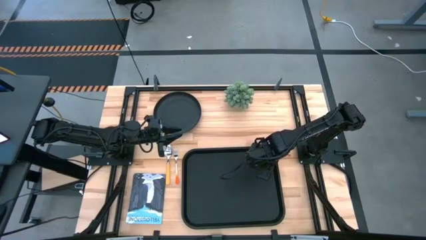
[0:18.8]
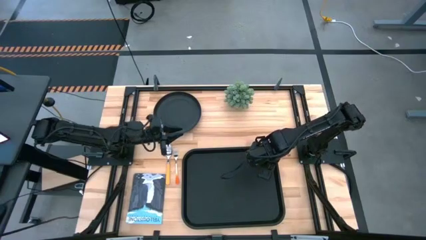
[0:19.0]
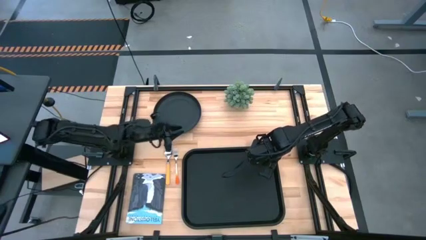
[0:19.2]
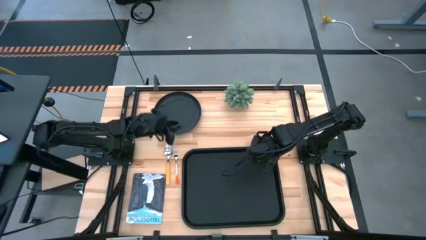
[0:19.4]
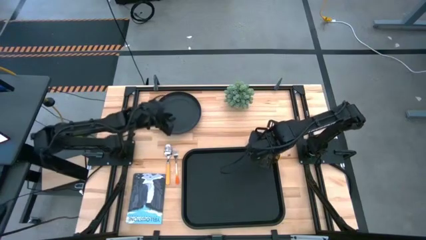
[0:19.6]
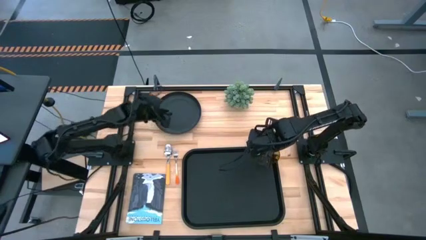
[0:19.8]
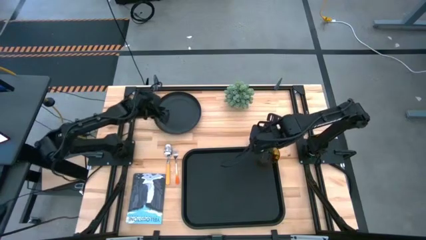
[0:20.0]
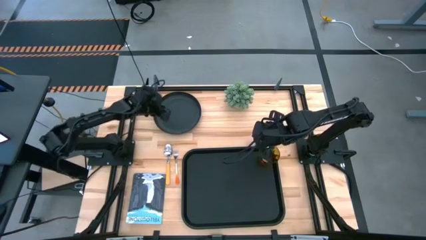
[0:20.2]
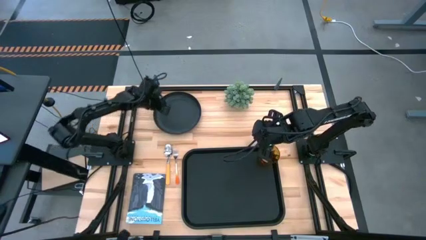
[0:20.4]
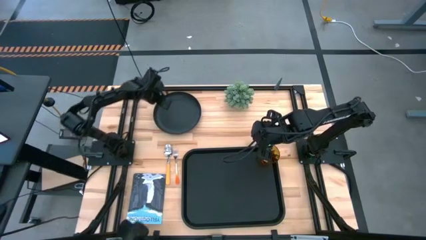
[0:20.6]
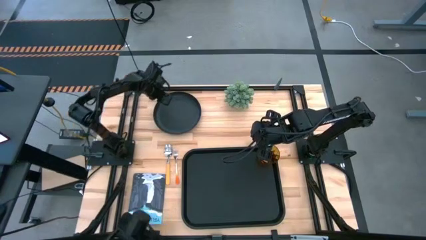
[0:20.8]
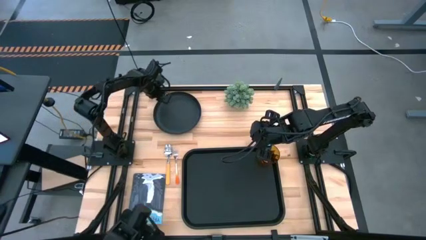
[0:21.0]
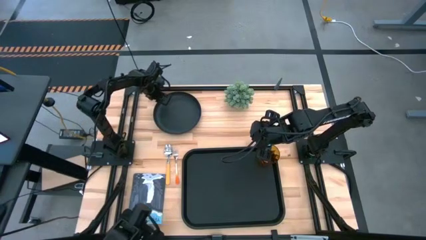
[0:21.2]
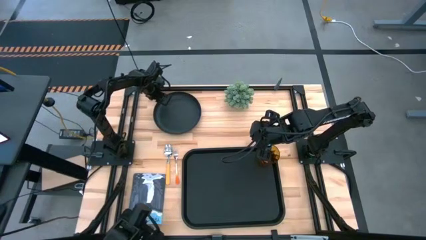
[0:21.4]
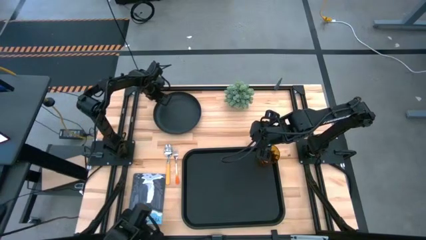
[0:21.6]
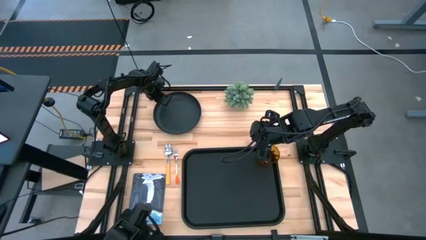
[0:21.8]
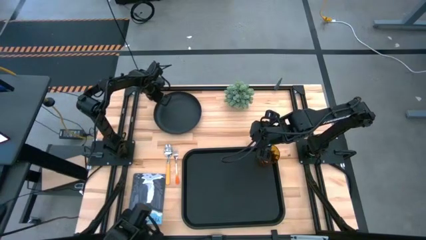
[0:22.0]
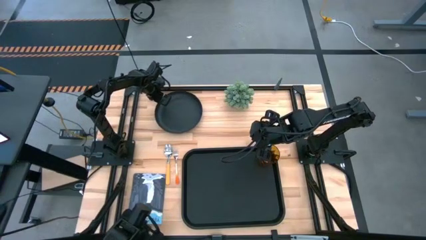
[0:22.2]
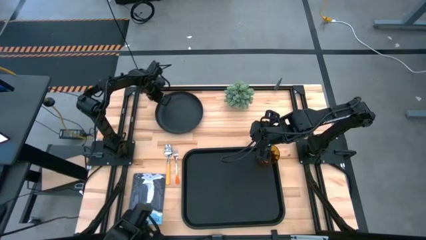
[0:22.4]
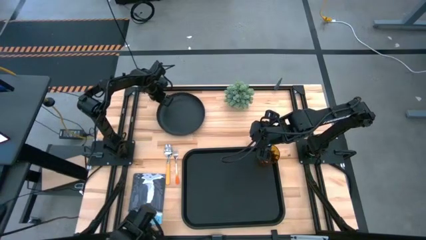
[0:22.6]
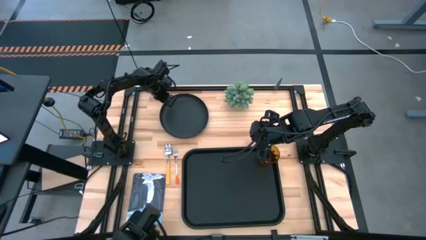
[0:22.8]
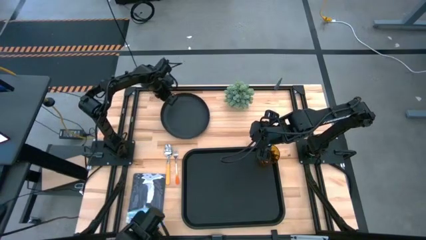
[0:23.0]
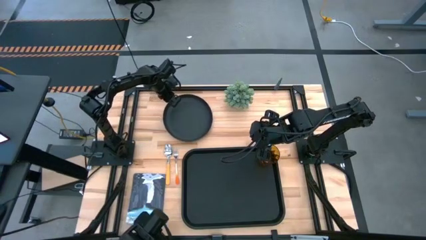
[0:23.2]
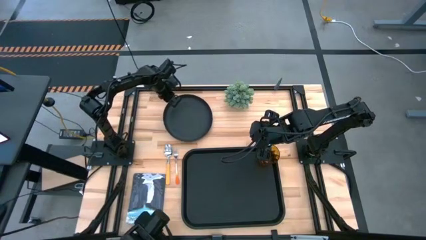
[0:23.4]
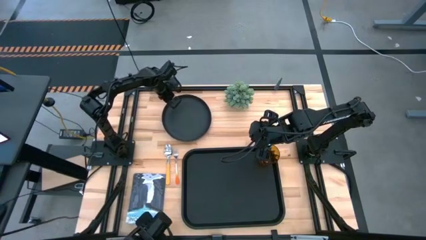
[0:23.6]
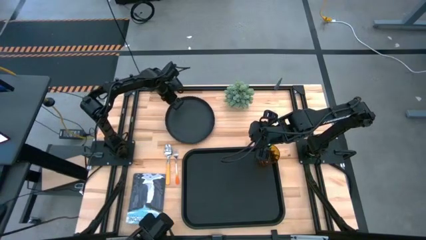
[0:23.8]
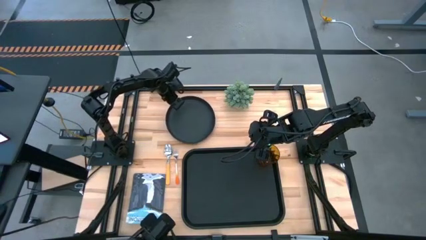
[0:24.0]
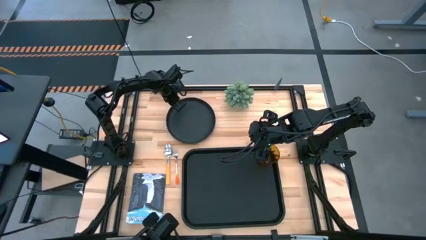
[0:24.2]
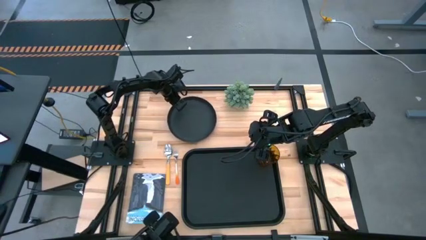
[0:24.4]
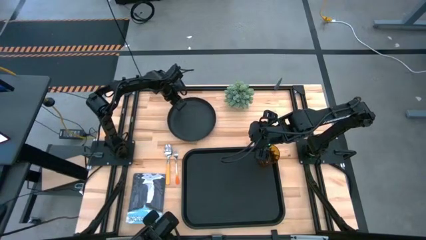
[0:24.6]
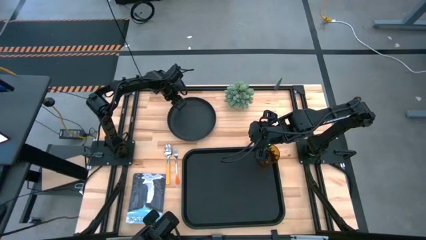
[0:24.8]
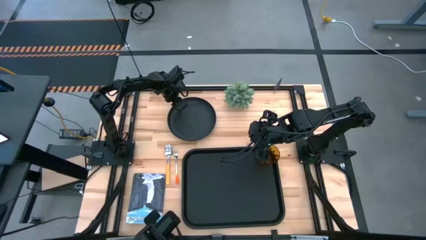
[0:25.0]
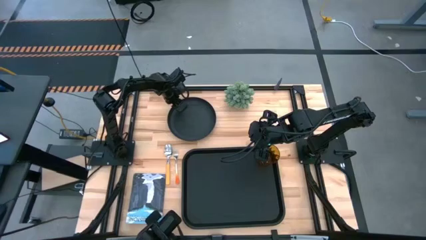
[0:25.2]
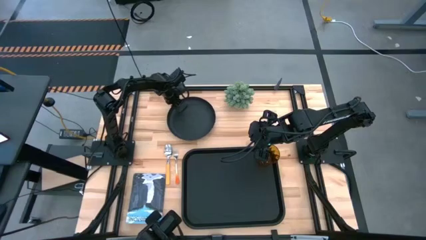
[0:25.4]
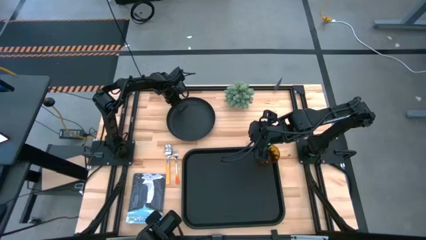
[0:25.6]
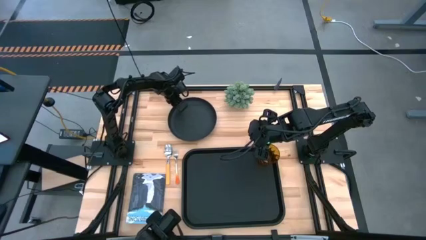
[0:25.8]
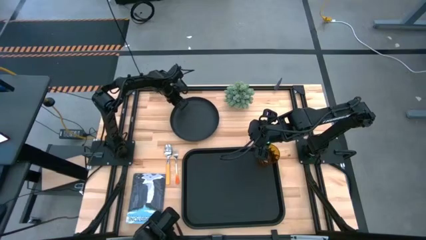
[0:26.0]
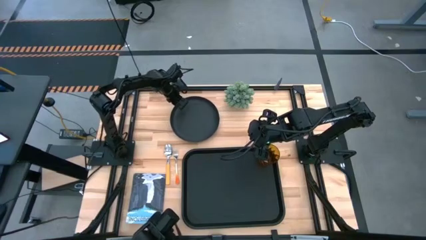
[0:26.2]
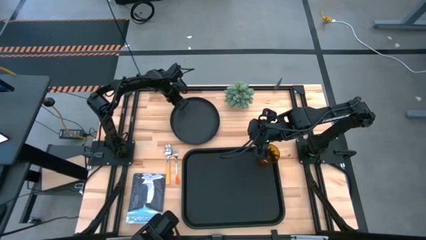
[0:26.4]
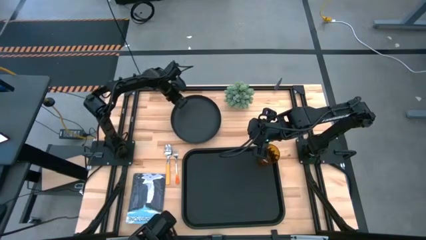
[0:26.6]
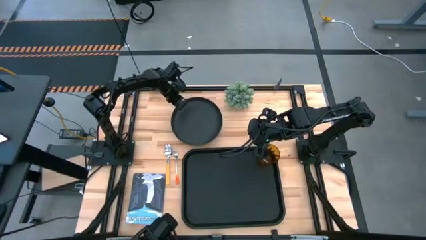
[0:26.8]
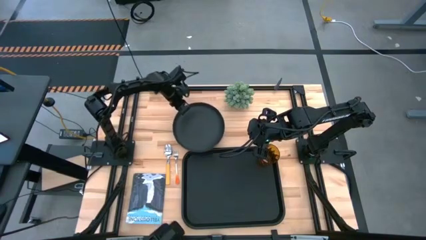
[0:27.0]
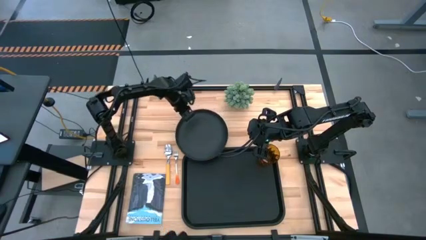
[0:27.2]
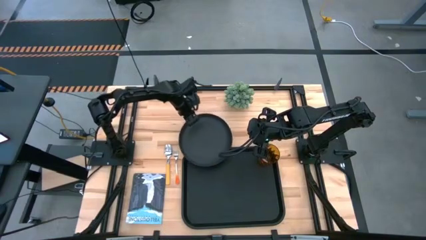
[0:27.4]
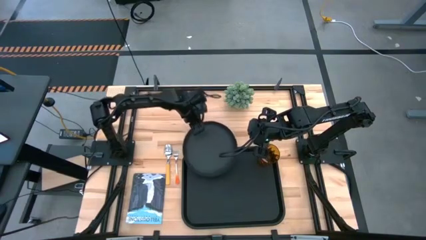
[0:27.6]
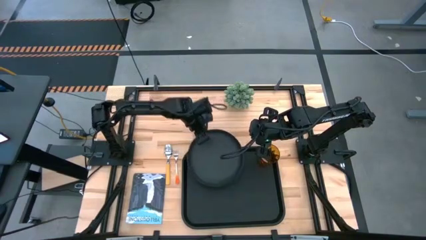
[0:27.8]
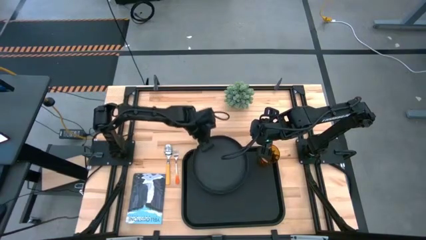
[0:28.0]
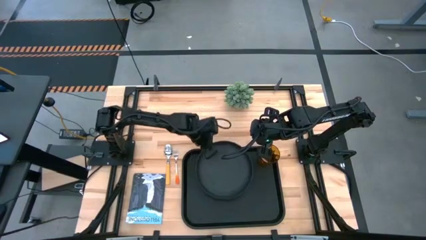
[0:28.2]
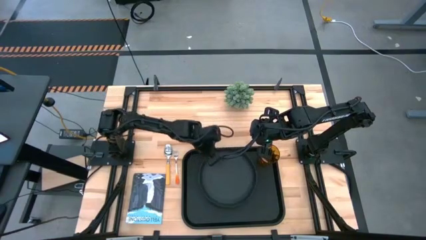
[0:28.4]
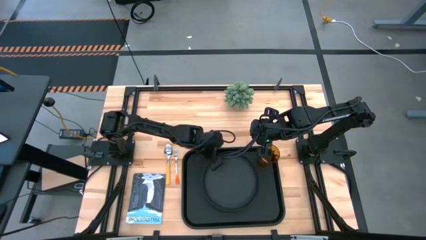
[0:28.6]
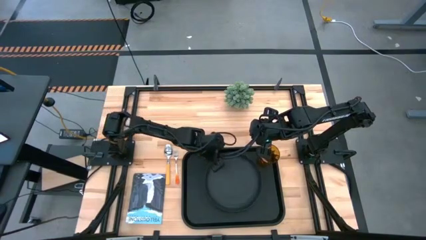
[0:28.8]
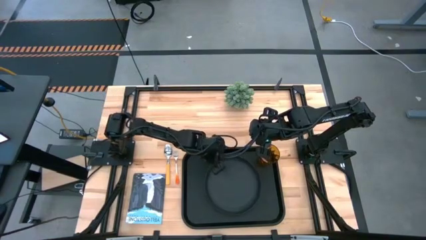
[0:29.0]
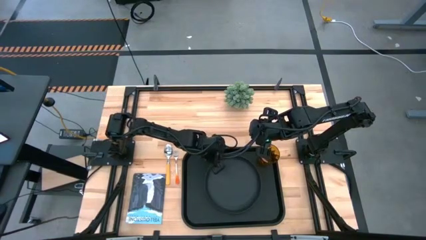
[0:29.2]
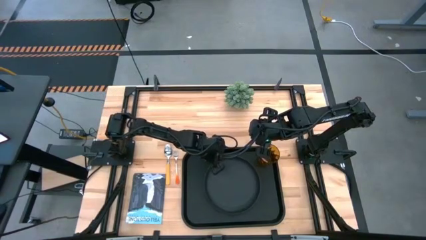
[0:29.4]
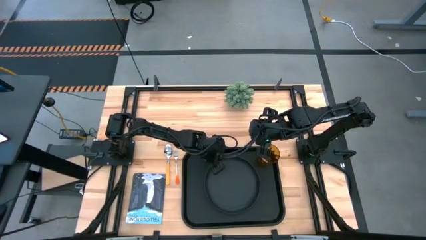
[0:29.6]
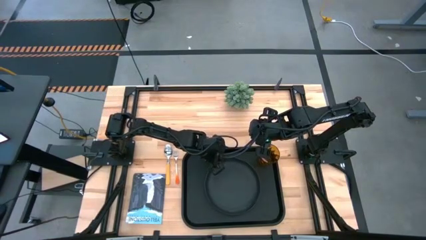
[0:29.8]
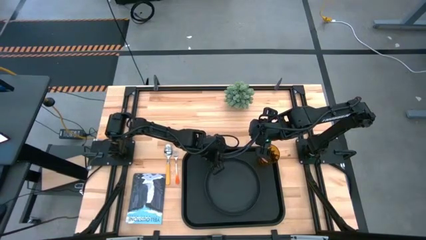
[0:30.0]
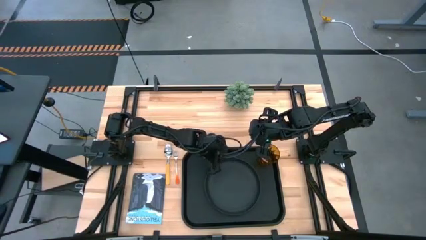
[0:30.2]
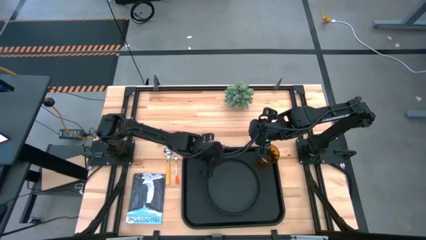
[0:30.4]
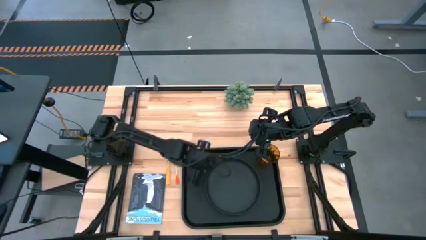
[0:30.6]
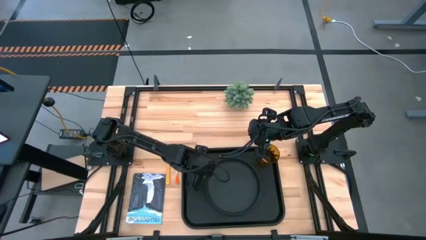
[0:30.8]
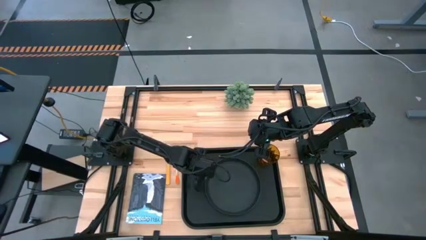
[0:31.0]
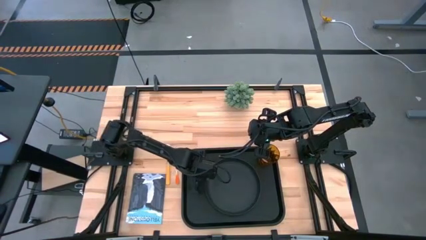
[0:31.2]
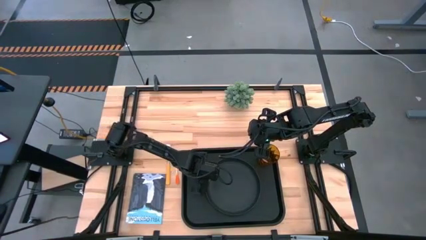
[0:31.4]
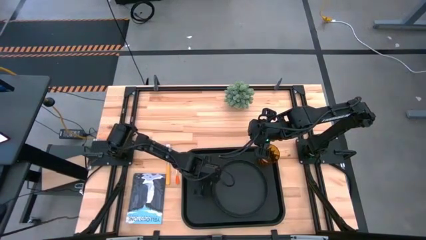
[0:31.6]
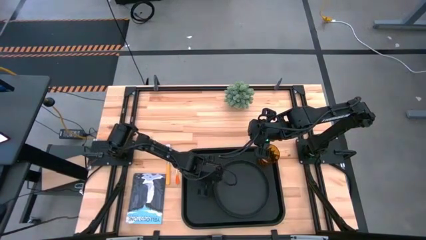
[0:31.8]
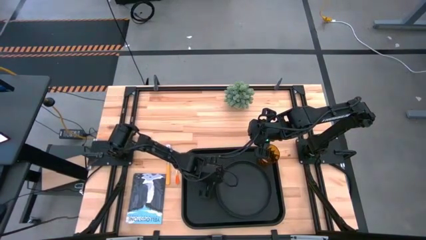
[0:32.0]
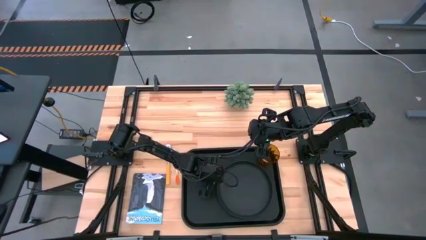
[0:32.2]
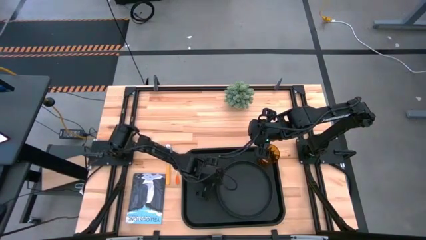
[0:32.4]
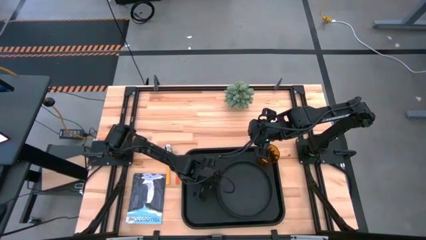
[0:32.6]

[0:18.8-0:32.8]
Task: Pick and place plate/cup/fork/spoon on tray
Put the black plate on the black serving tray

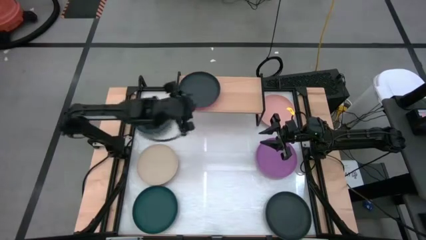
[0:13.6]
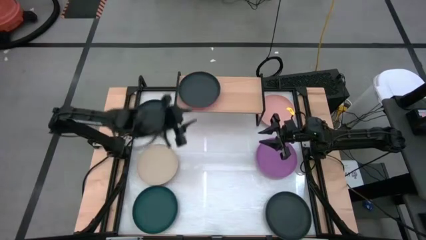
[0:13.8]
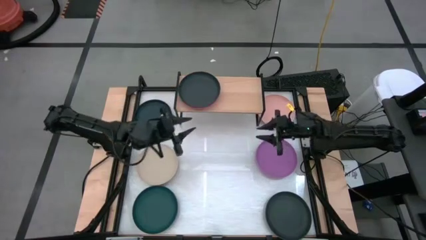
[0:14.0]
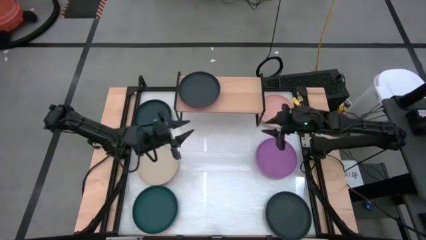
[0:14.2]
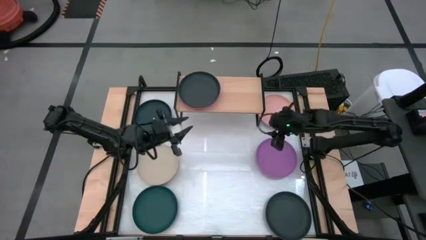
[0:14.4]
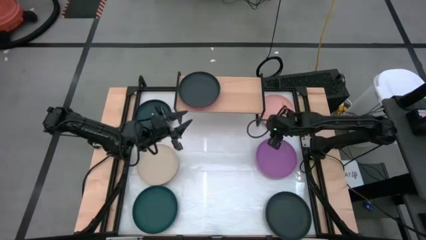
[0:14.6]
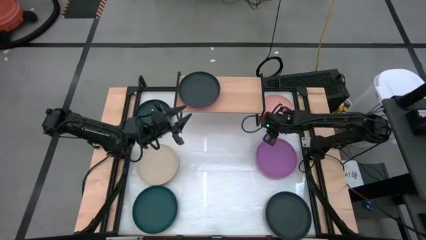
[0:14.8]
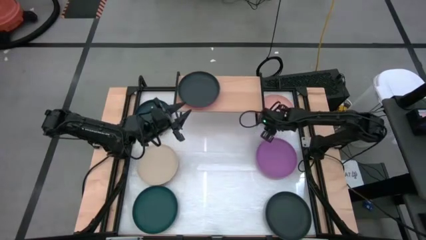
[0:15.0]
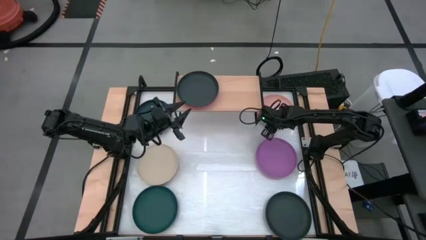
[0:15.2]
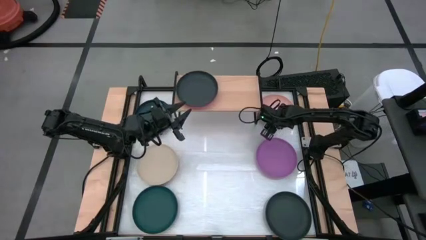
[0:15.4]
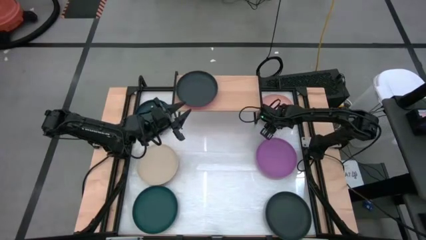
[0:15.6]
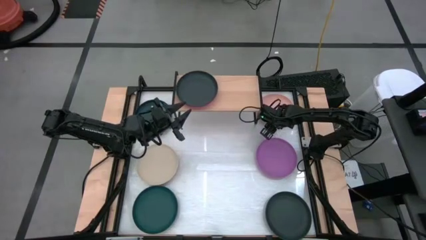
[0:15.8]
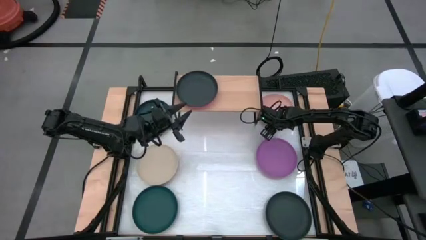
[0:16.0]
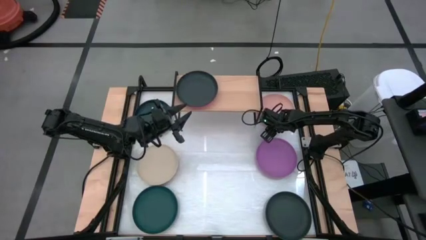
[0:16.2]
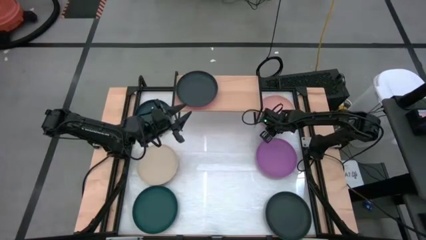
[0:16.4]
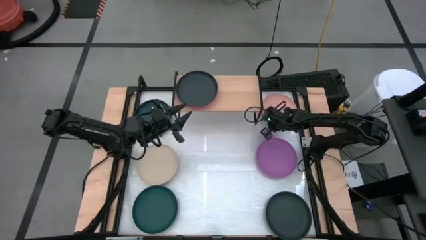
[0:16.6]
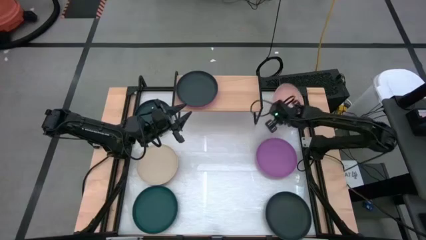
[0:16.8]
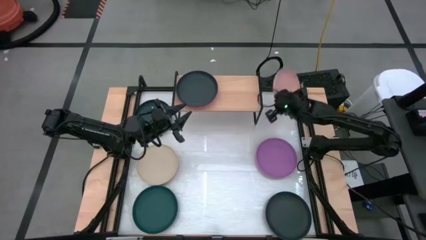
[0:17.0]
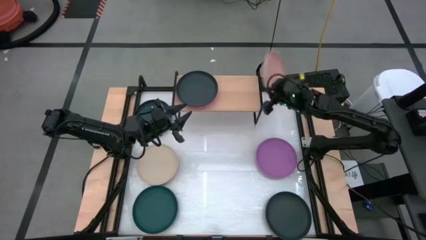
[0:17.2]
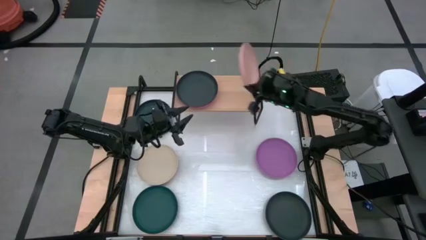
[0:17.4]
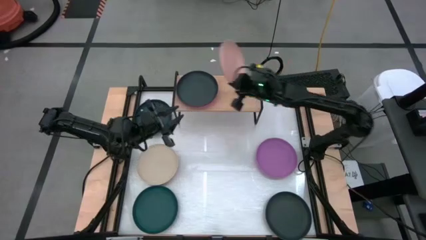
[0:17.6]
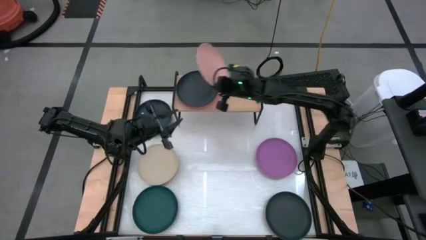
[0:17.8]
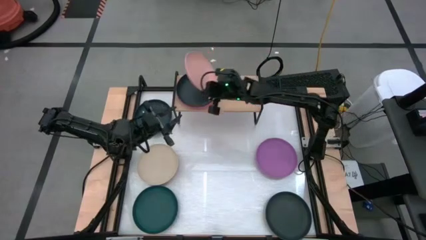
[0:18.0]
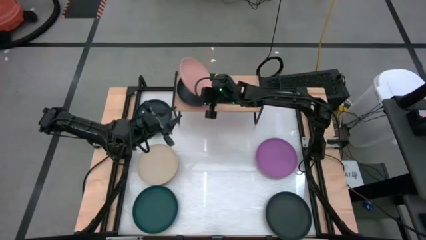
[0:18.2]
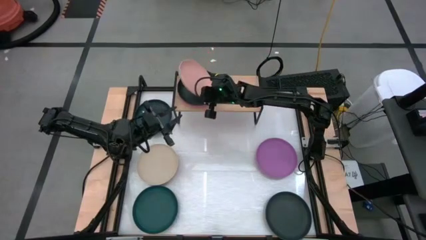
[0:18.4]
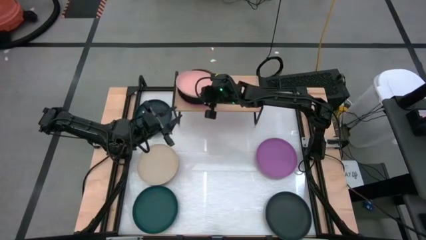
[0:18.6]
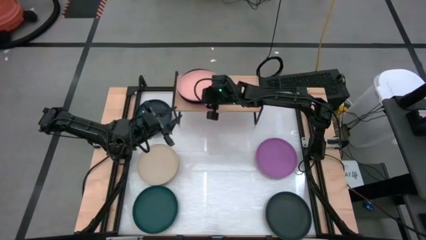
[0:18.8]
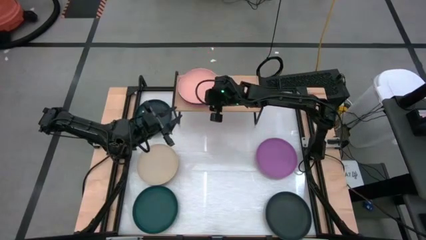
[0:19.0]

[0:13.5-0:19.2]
Task: Place and stack plates onto a shelf
Stack the light brown plate on top of the black plate on the shelf
